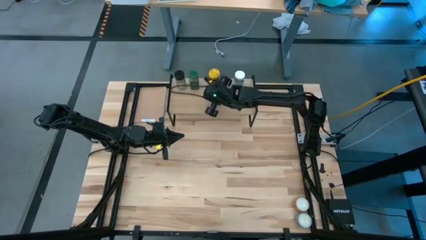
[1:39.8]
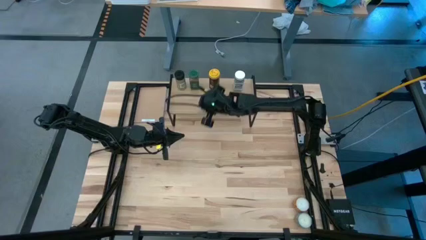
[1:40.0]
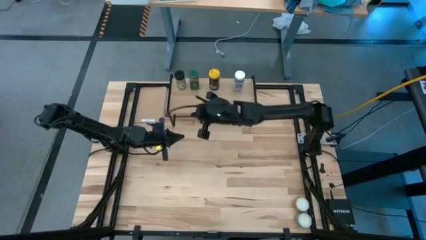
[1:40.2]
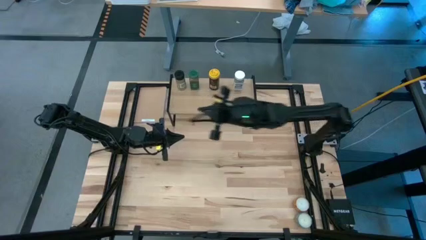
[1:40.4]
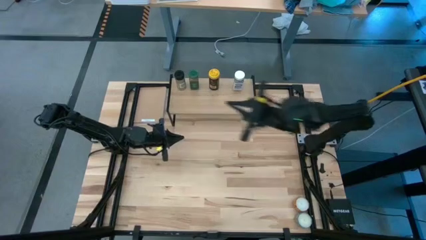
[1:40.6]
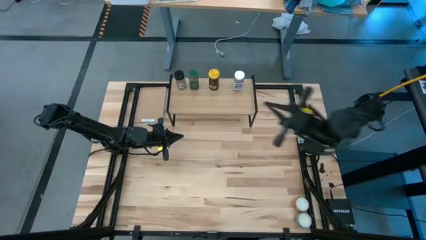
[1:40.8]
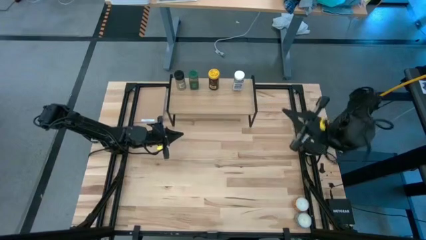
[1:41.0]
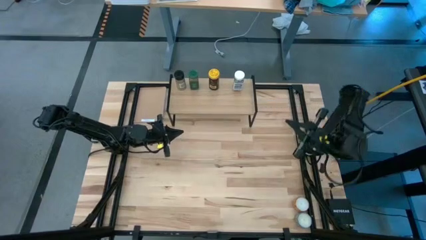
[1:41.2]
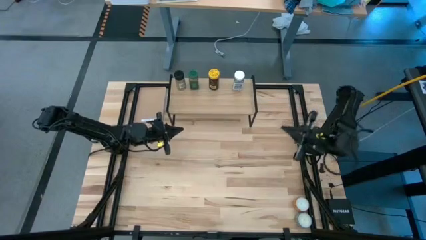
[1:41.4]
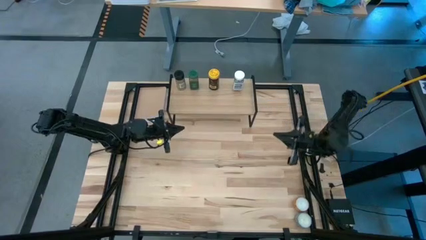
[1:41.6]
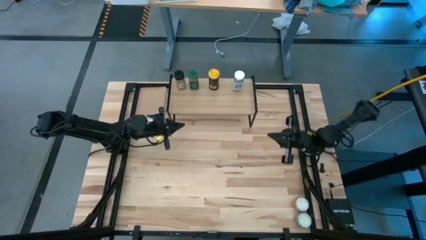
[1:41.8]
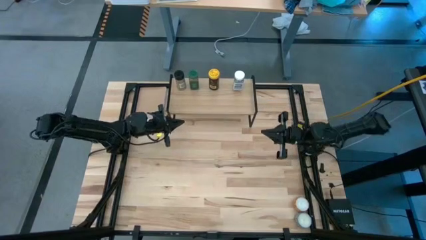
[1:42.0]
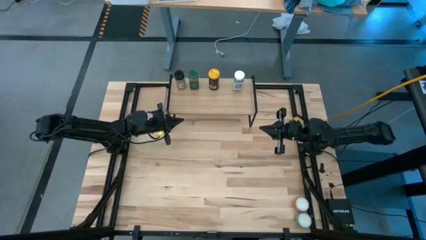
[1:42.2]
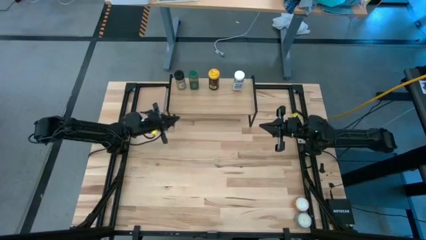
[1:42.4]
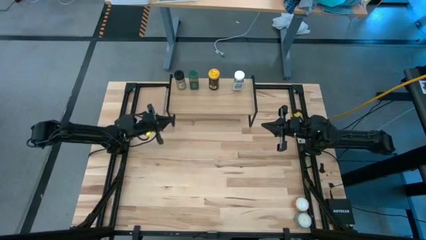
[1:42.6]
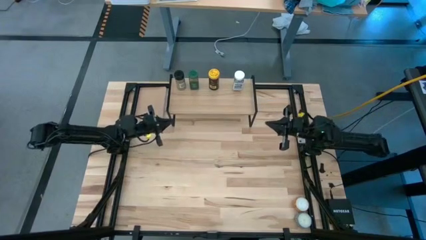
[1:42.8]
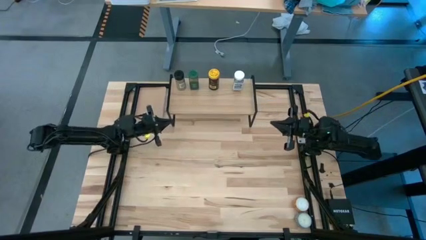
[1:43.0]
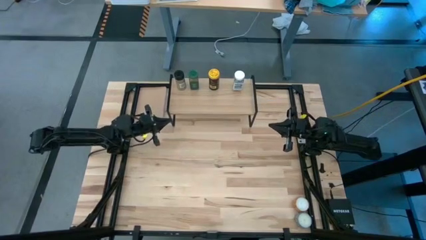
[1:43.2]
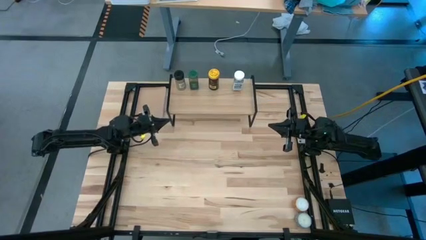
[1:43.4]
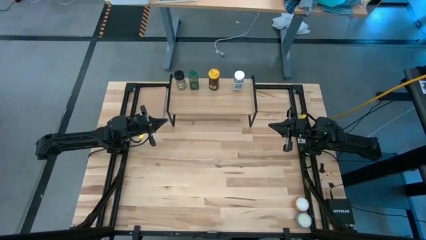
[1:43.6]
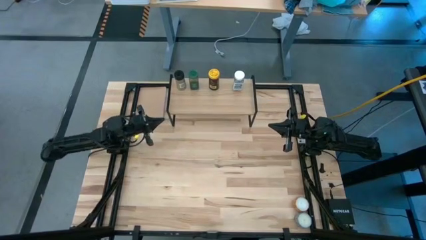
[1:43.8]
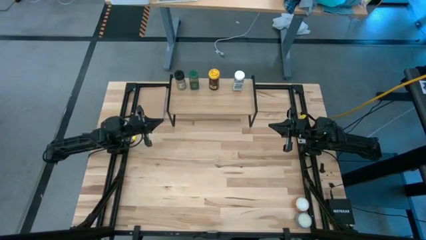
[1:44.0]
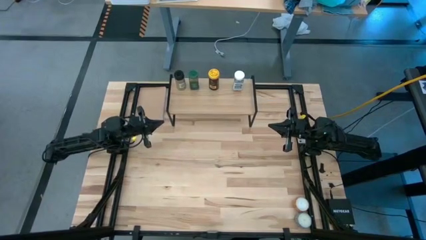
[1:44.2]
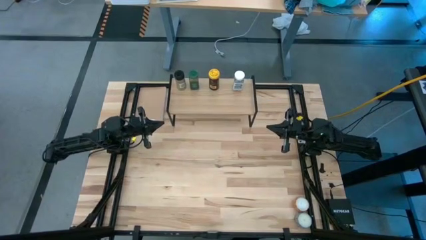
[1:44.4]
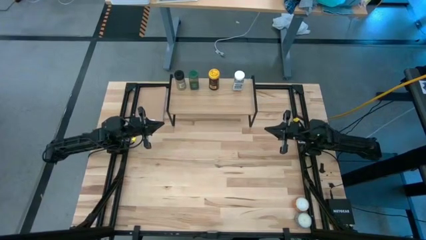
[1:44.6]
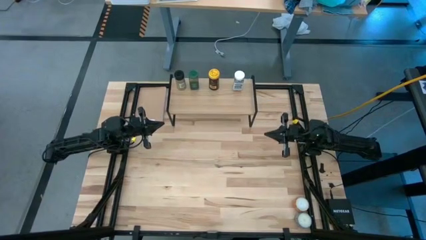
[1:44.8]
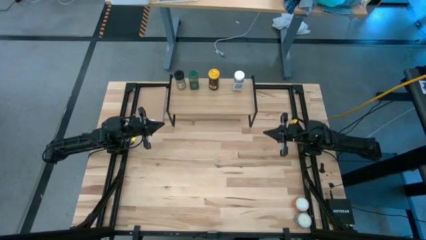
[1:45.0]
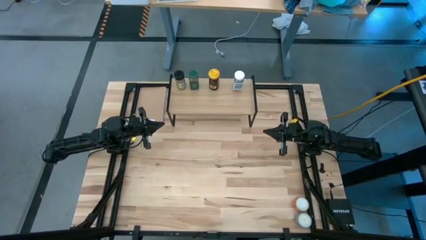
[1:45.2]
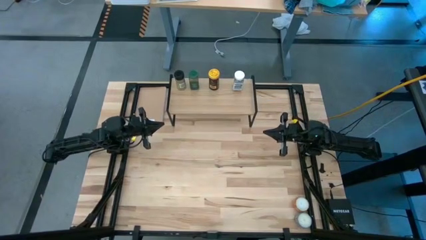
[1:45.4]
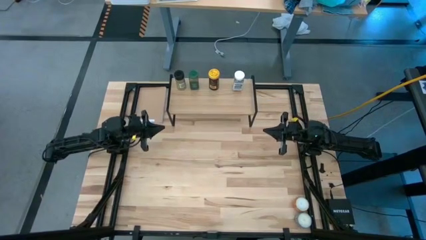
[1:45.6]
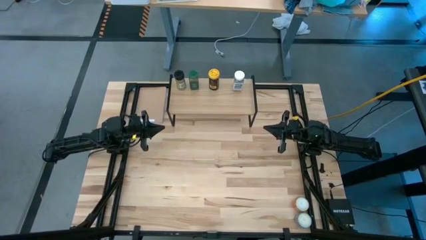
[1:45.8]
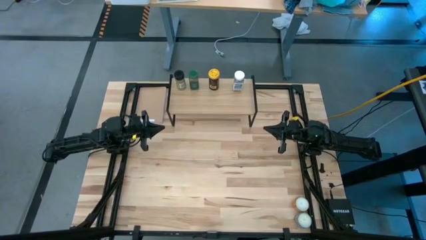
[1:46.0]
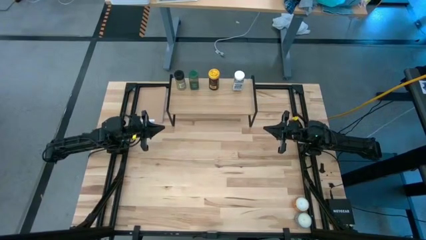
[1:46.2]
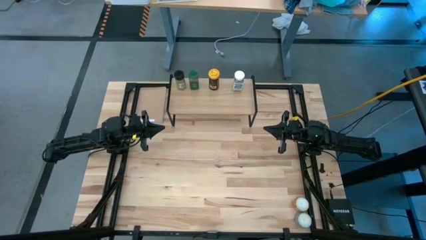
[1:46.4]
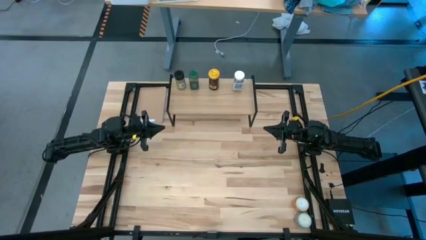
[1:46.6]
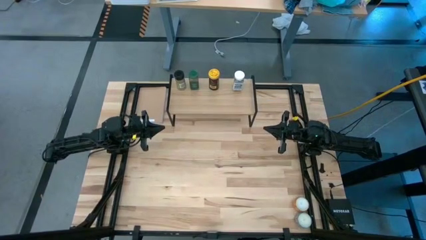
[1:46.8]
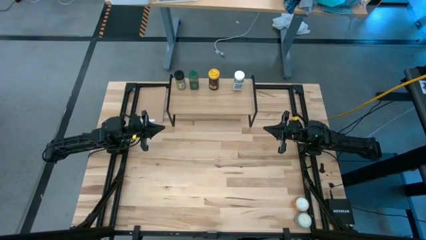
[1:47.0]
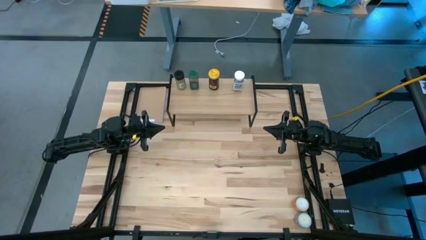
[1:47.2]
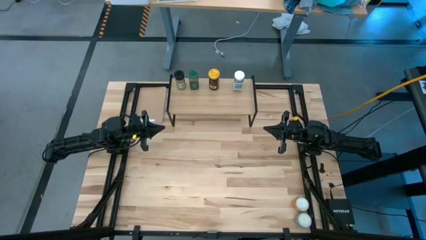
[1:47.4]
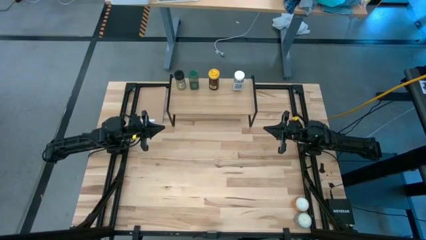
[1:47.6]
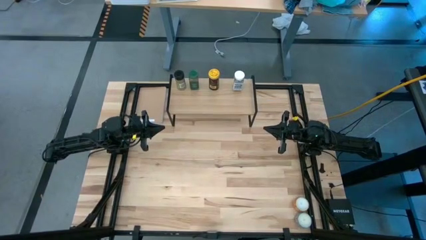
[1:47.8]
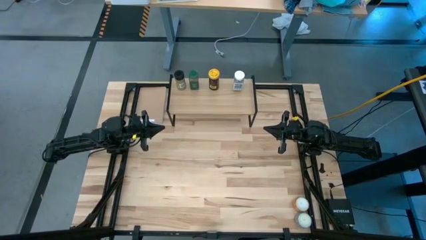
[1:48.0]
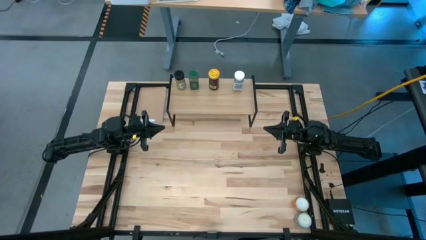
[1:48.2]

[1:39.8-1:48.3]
Task: Shelf spices
Return to Home Position

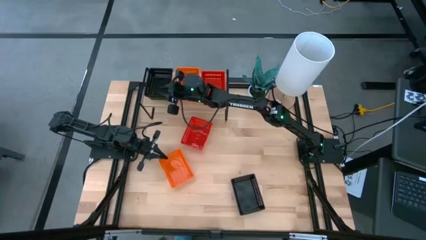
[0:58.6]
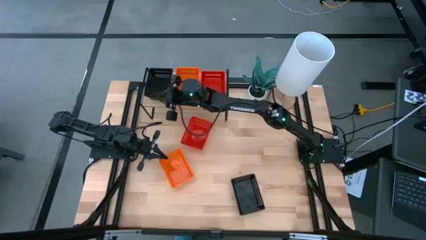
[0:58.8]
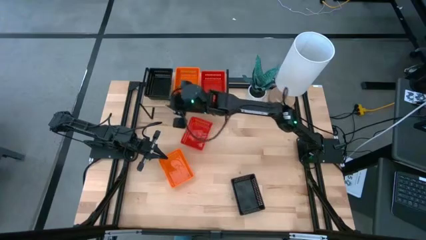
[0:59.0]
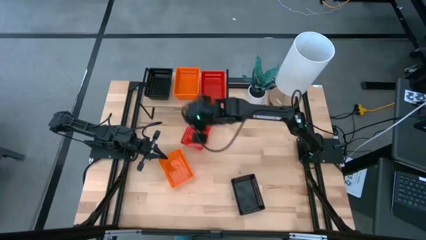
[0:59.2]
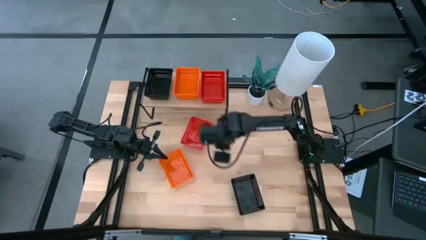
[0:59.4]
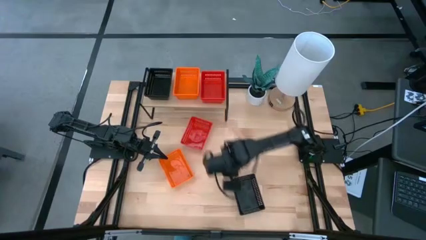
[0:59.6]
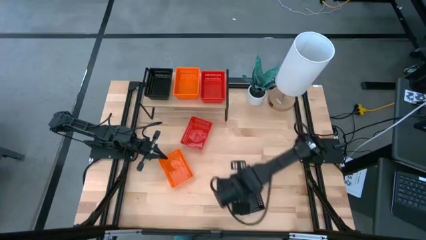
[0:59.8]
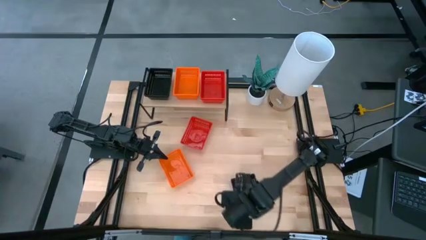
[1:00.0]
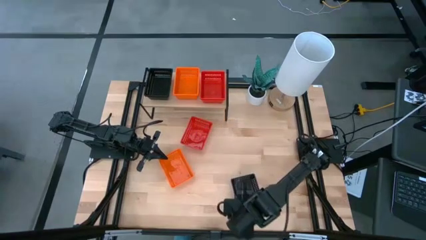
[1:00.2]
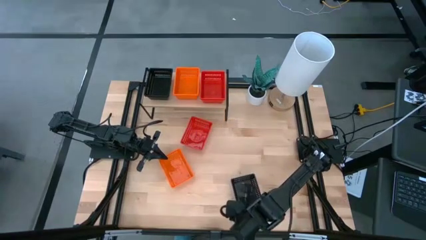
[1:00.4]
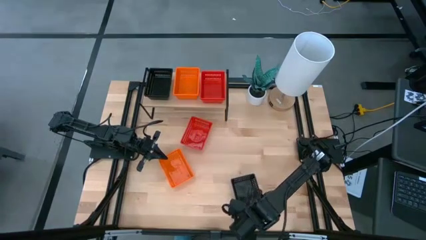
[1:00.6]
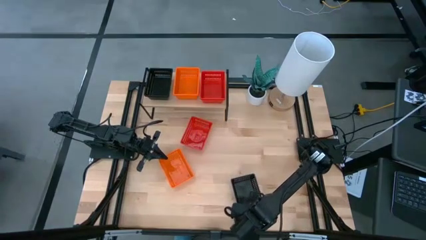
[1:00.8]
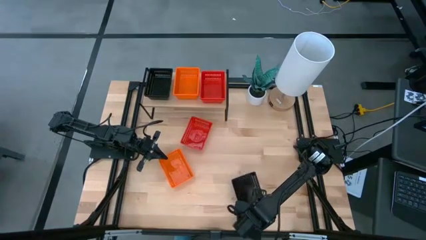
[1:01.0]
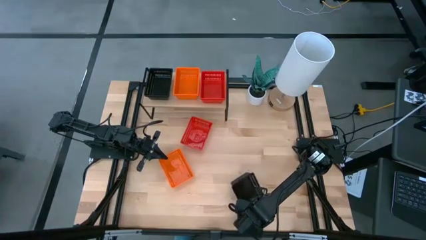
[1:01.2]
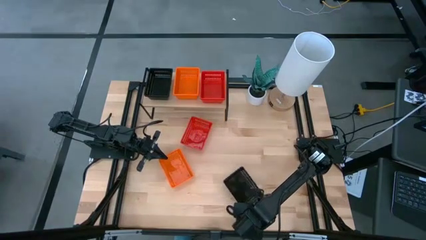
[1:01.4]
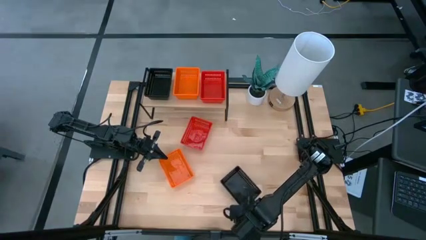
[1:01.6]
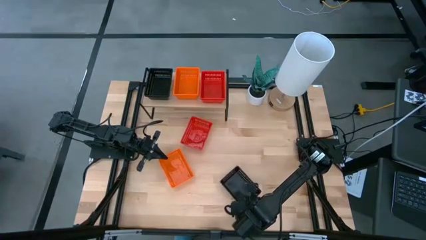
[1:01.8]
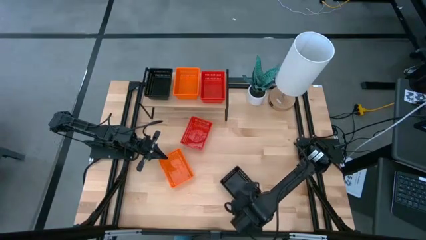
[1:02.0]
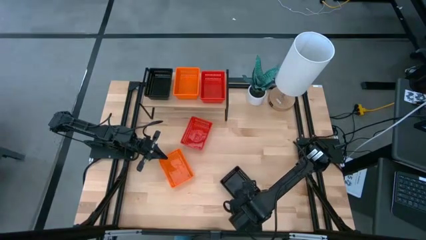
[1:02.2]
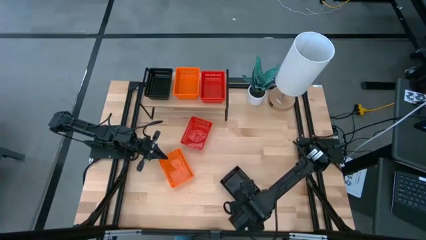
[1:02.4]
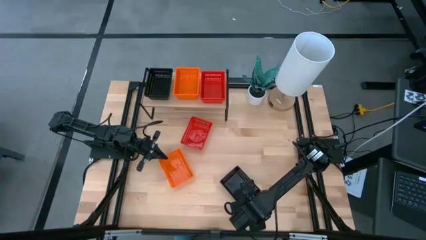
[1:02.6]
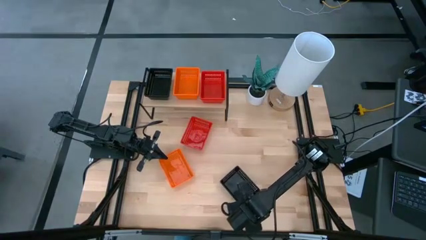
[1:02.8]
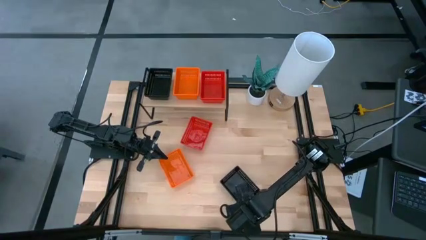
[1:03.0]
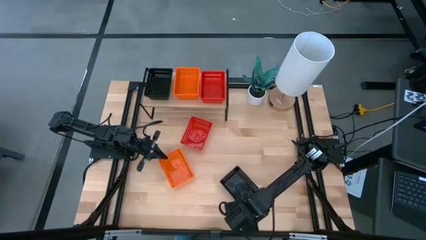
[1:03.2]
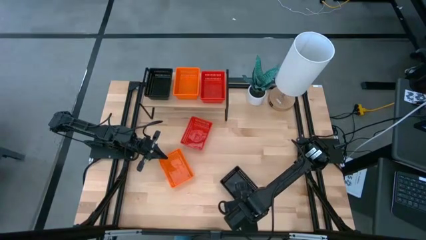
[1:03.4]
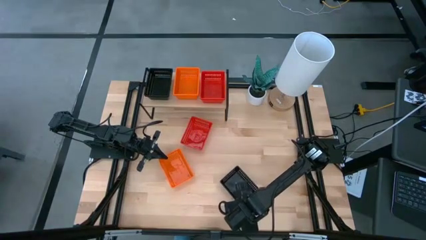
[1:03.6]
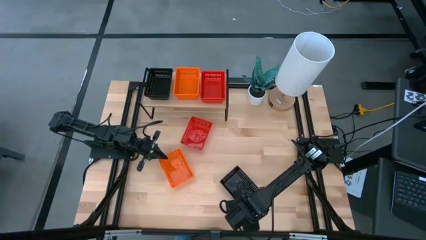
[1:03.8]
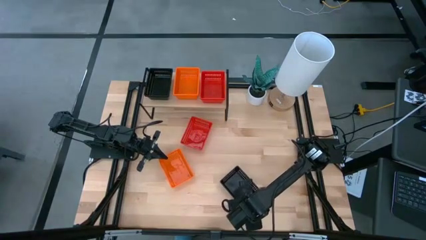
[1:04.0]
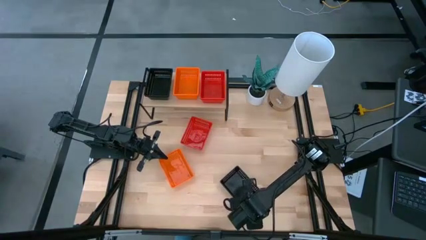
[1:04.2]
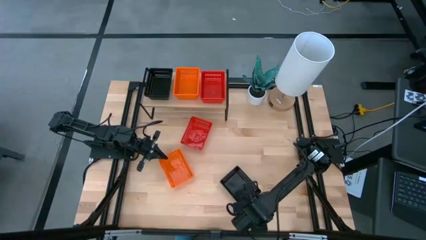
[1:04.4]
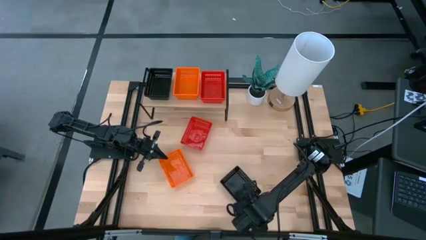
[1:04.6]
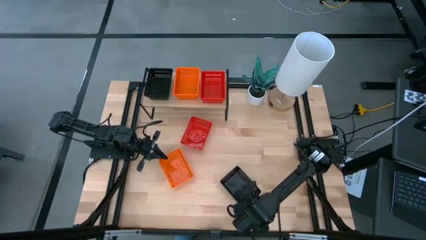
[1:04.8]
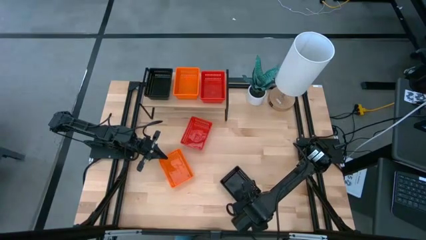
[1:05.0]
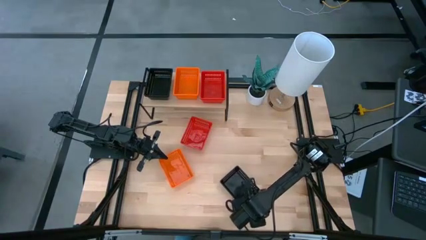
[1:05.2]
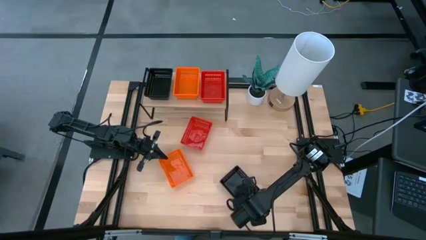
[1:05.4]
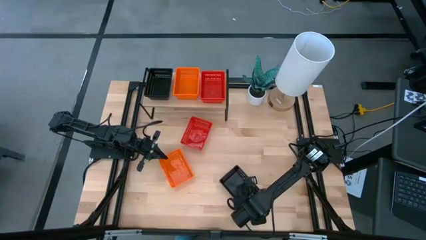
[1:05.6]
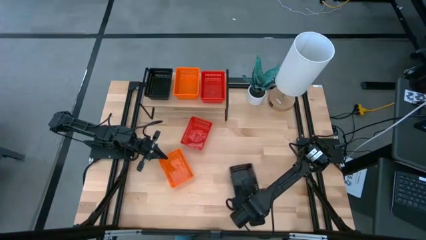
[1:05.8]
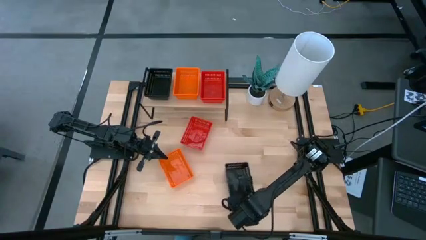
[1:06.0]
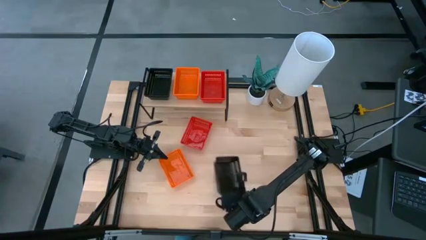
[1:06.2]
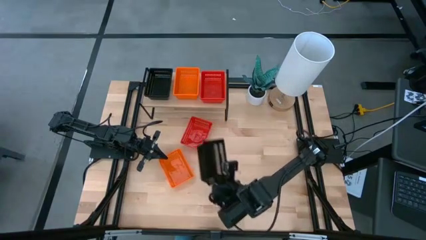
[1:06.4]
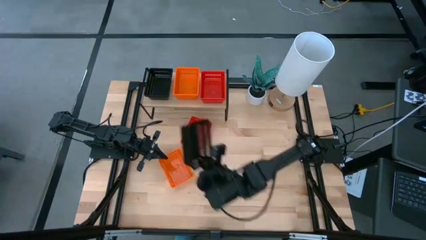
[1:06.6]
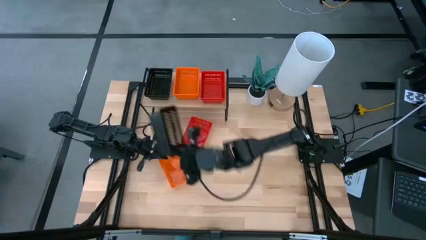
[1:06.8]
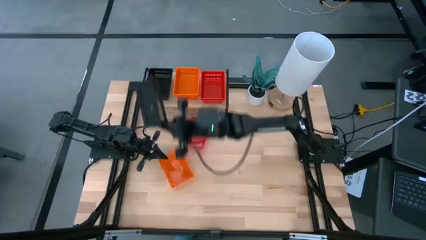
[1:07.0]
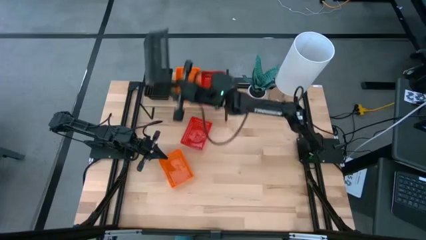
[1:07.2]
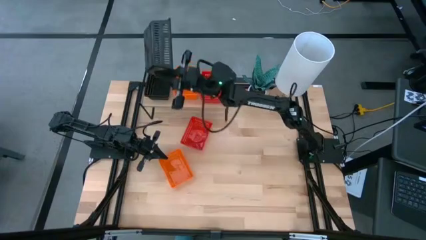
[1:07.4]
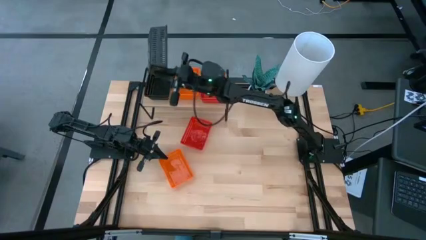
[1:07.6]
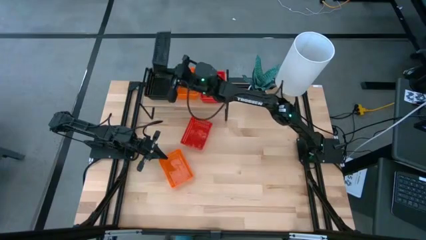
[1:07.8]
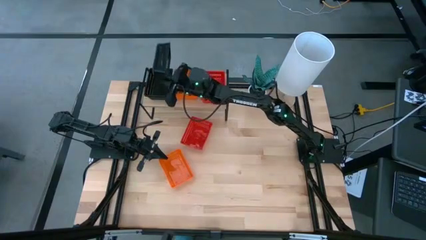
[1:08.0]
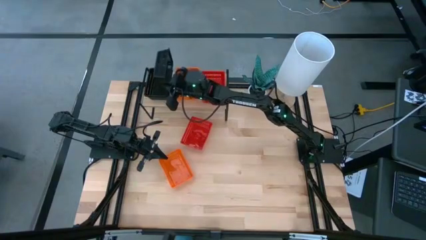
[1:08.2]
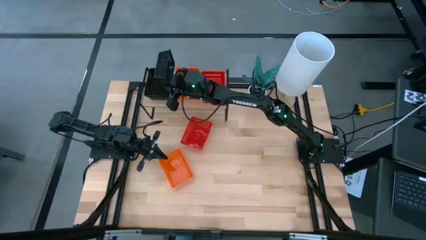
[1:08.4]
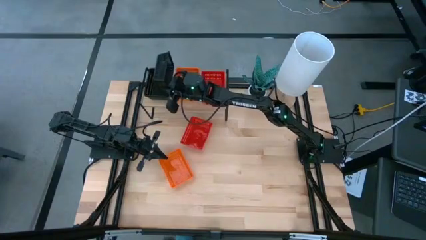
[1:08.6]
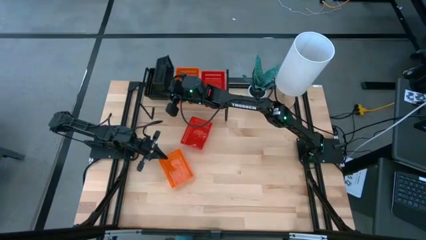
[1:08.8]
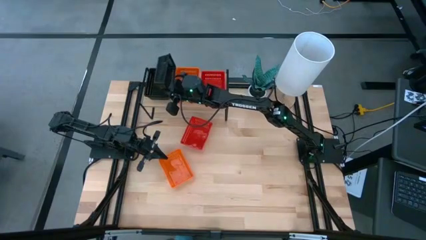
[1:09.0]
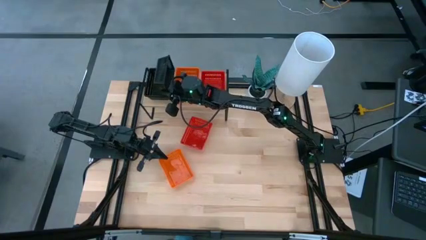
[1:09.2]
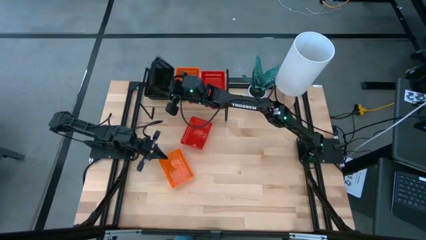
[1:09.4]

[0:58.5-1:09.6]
Task: Stack baskets on shelf by color
Stack the black bin on top of the black bin on the shelf
